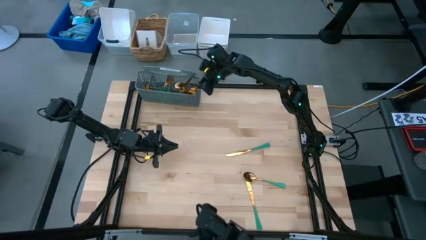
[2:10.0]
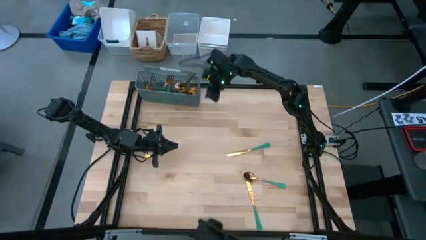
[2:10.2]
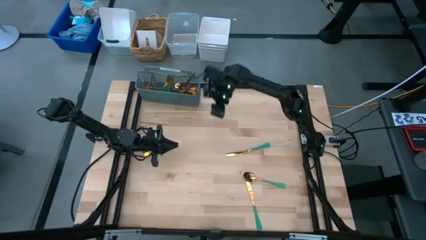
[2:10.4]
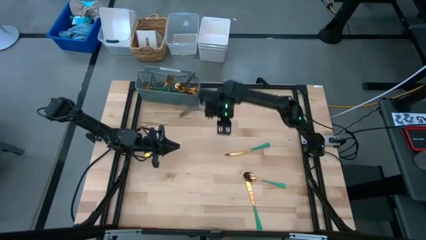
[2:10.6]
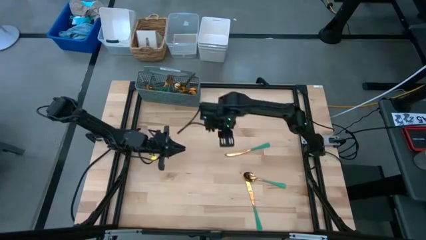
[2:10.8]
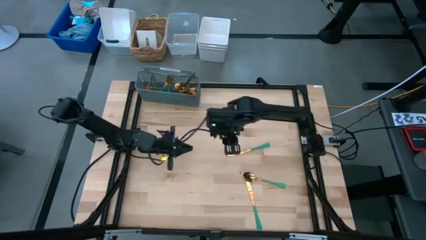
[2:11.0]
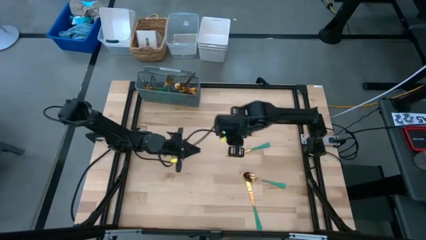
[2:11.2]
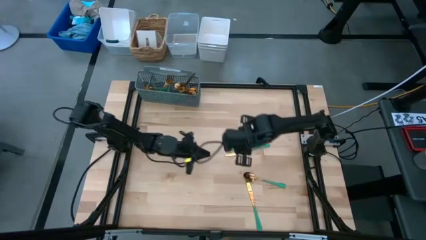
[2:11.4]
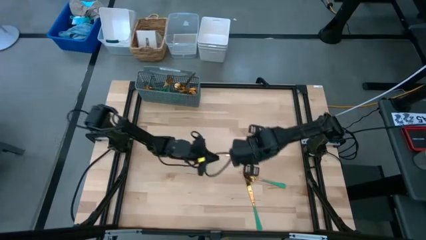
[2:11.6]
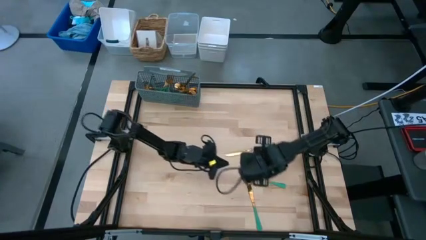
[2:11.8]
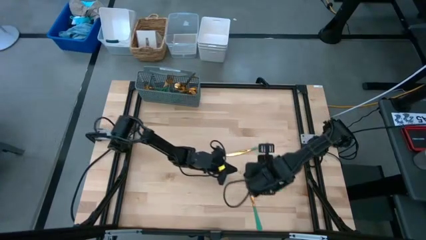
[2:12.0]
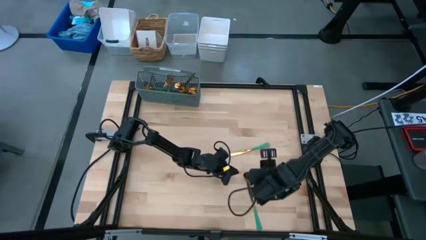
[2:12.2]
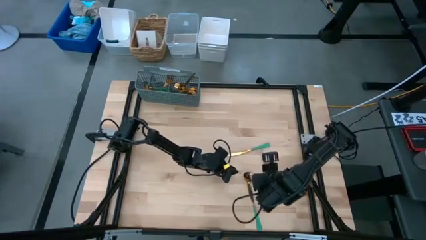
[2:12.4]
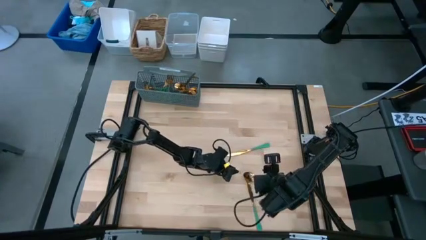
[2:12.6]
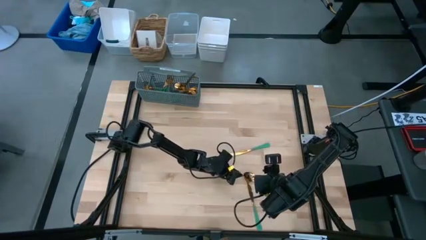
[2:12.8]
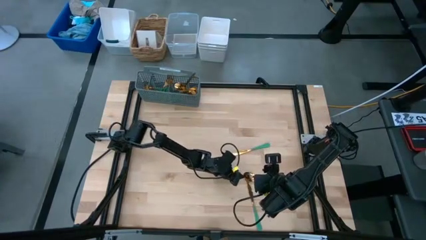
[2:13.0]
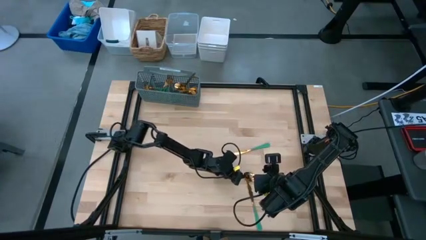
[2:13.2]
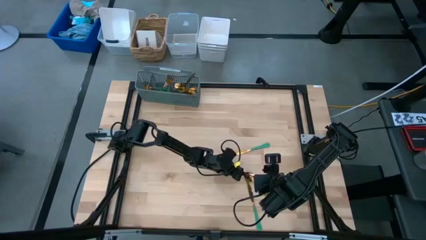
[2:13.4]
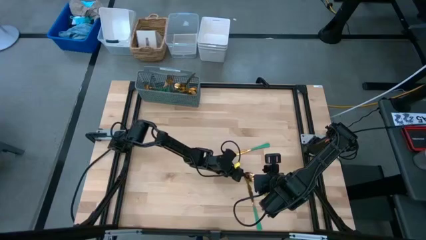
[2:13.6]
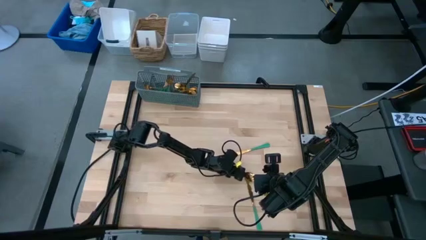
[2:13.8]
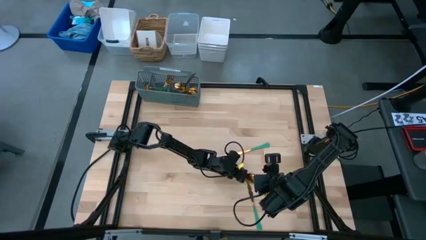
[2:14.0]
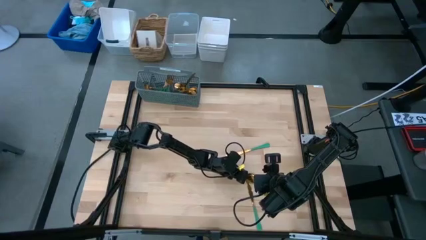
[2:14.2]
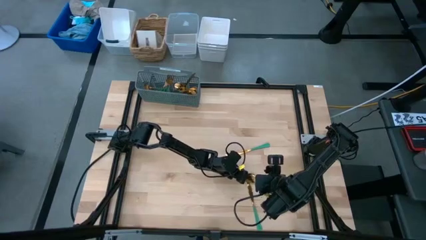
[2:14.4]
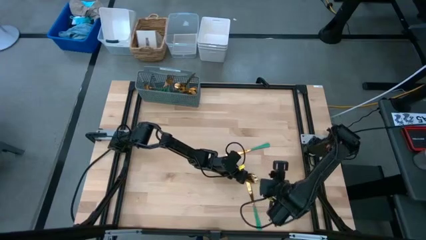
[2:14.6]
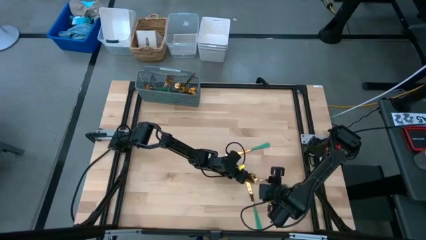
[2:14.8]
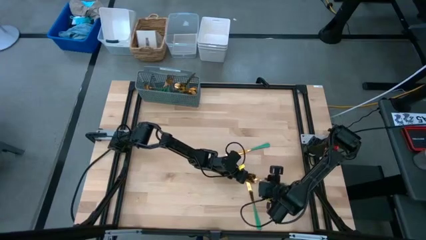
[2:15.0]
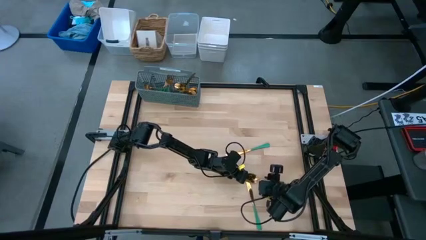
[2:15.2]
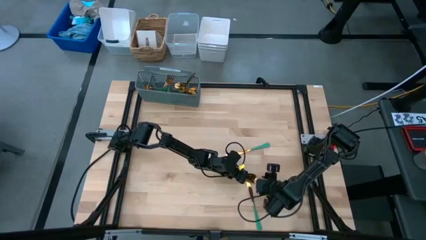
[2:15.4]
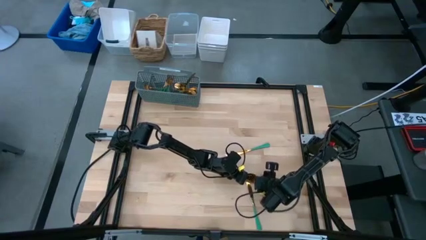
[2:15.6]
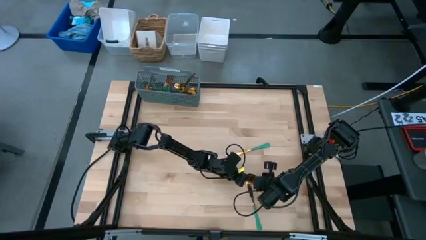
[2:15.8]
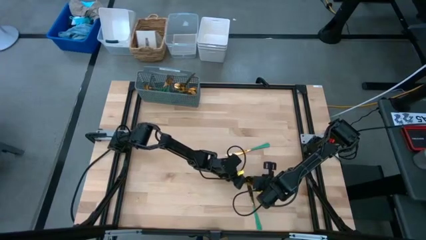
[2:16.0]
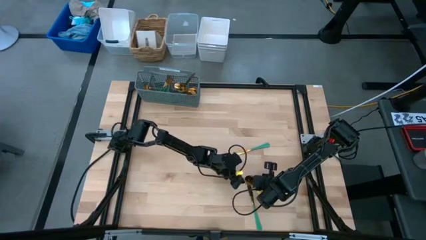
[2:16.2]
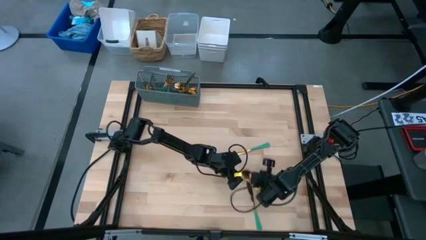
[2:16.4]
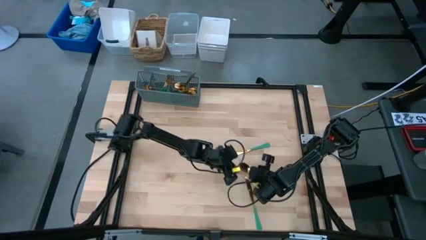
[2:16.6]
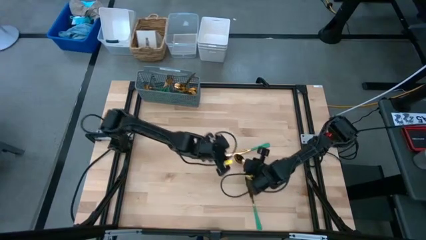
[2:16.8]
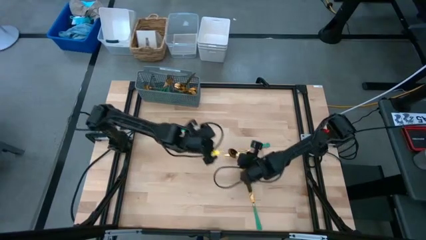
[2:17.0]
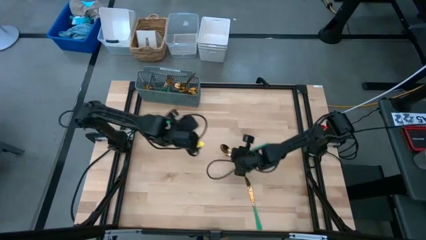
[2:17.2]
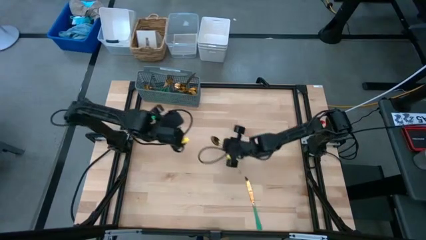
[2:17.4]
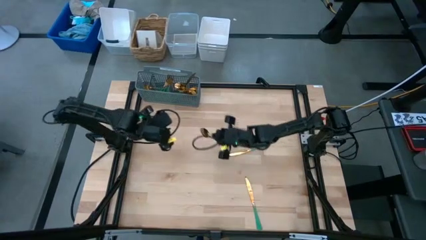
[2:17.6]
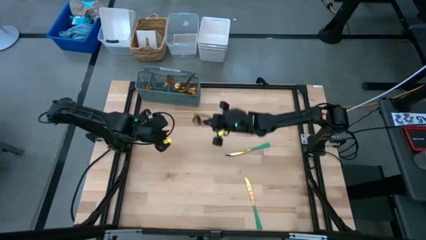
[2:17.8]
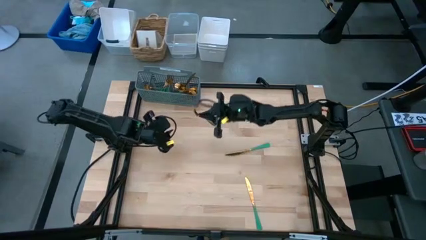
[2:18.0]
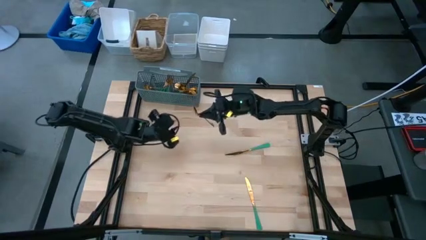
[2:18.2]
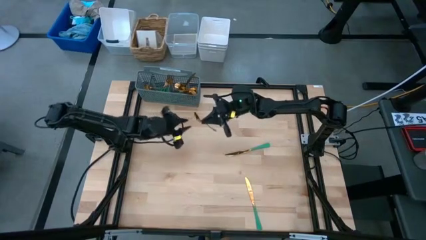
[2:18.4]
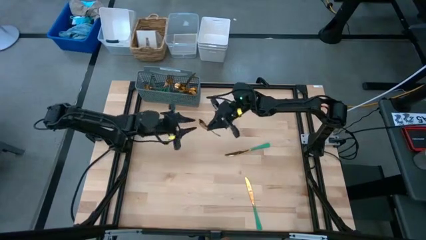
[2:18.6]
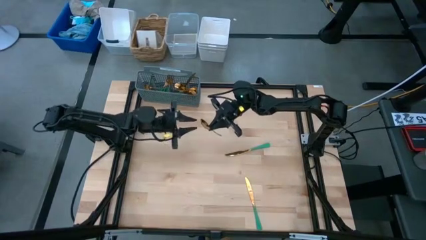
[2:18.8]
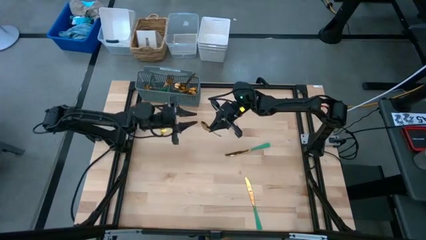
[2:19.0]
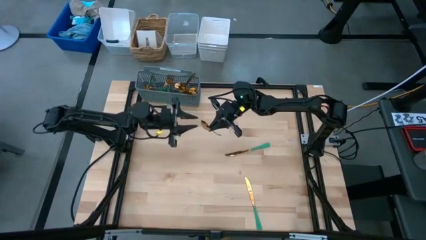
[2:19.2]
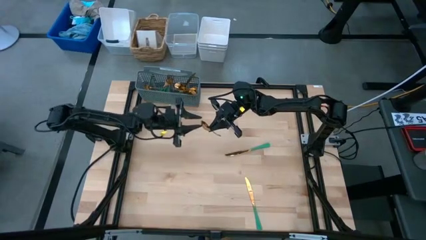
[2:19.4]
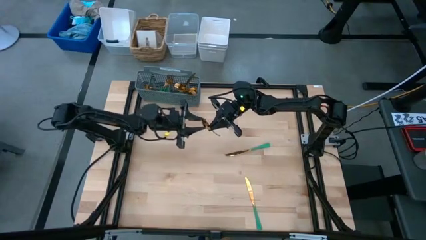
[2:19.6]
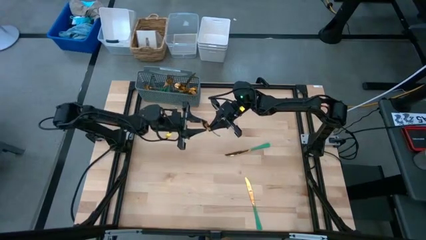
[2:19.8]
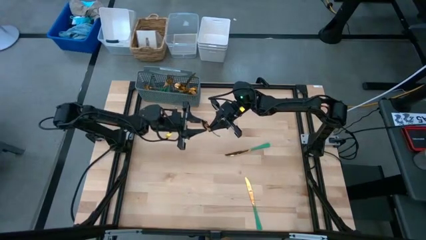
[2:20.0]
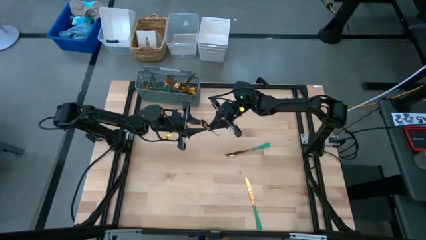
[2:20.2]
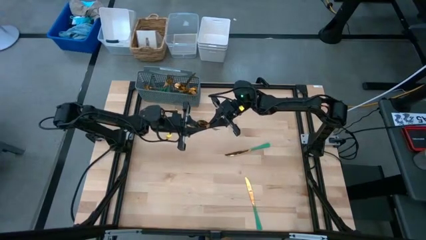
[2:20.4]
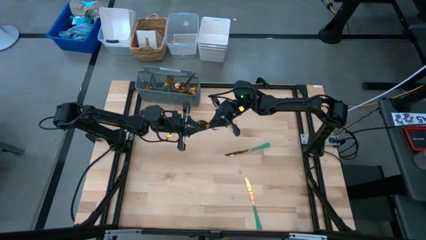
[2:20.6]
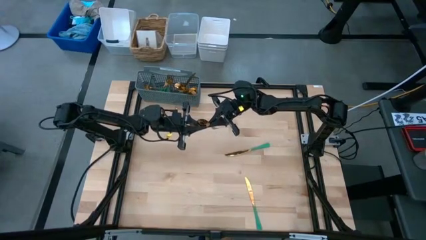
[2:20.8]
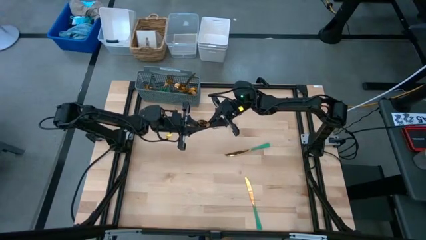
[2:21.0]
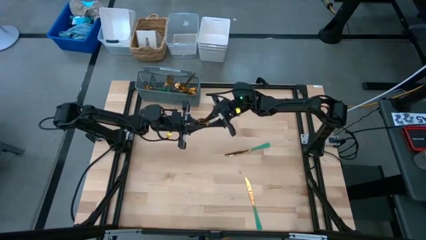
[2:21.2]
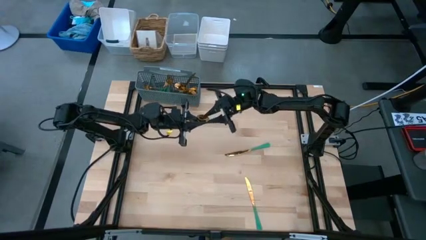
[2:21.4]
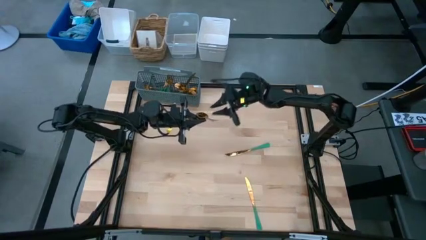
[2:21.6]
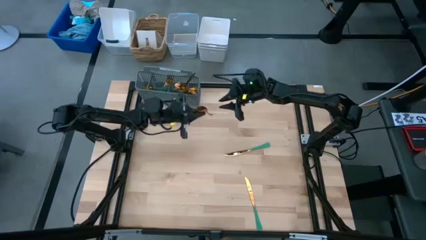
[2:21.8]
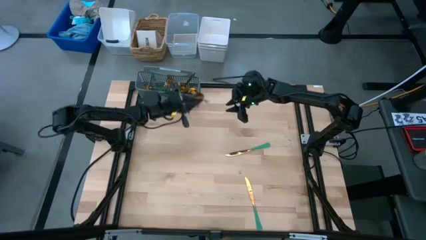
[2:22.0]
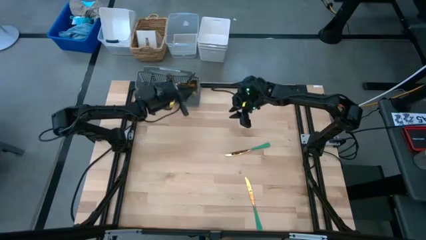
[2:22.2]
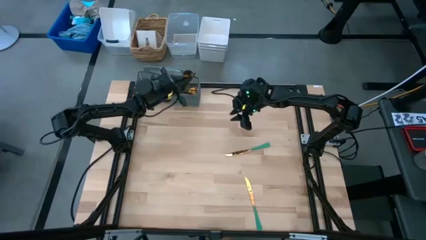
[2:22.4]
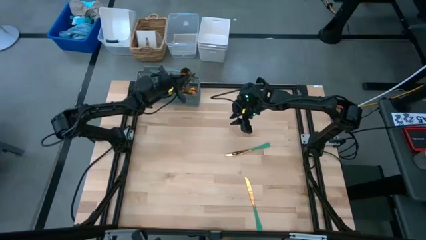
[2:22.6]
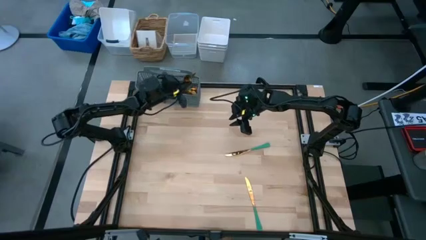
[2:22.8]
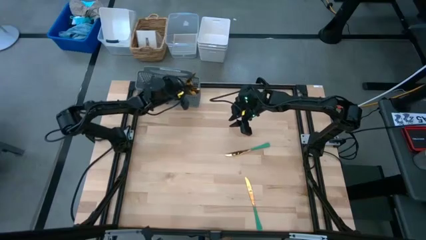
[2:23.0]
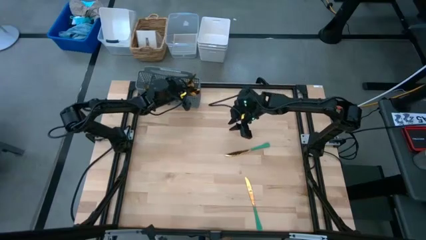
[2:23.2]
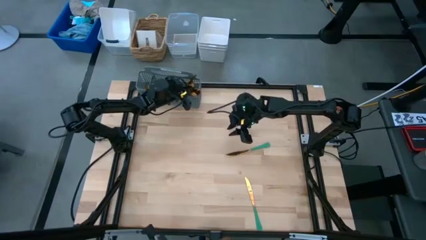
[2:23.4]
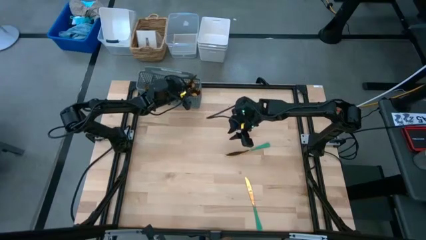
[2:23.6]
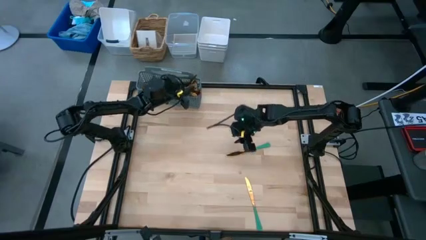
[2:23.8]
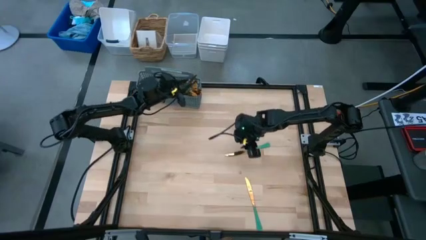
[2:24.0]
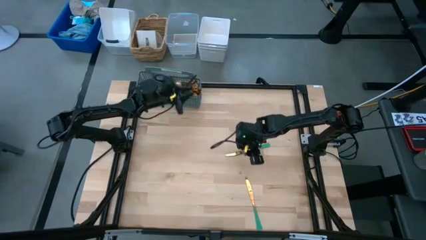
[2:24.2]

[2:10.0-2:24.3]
Task: Sort silverware
Put the green spoon into the gray silverware basket

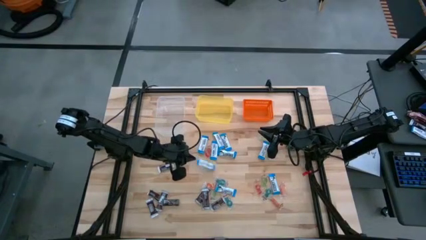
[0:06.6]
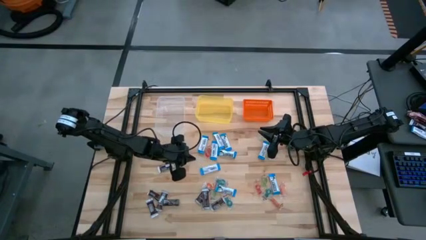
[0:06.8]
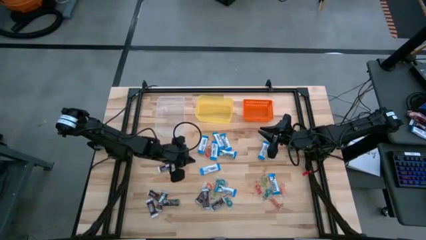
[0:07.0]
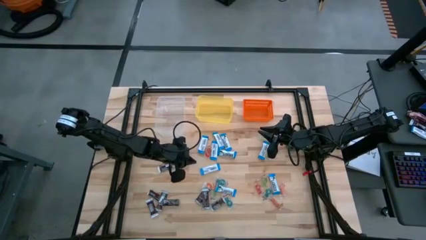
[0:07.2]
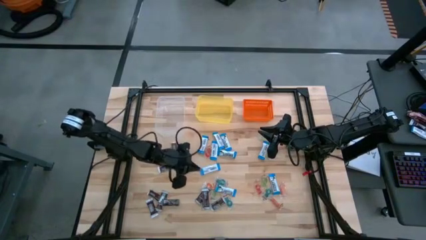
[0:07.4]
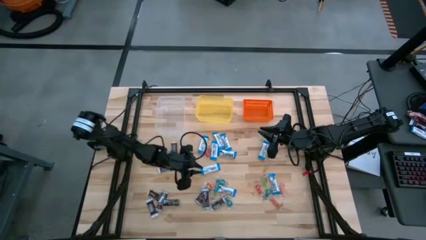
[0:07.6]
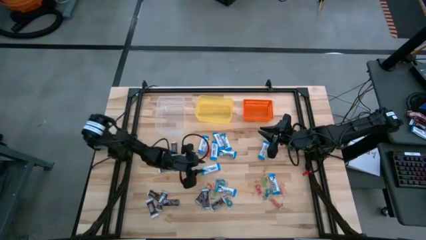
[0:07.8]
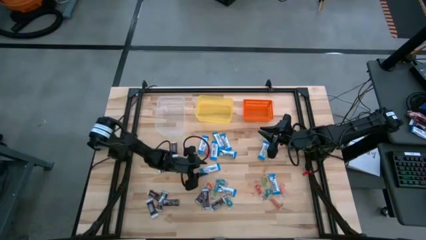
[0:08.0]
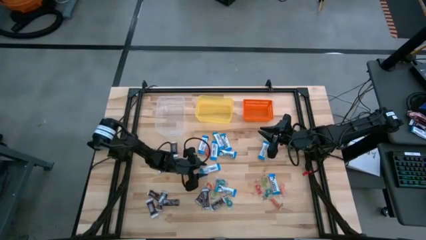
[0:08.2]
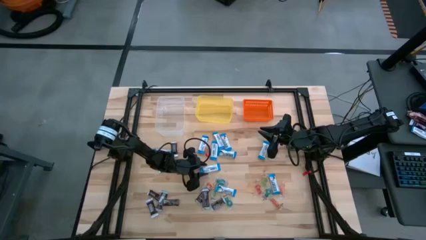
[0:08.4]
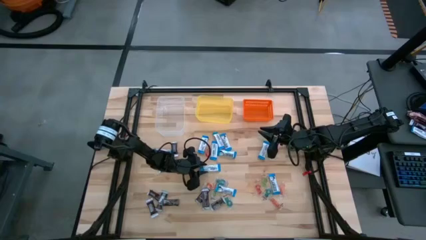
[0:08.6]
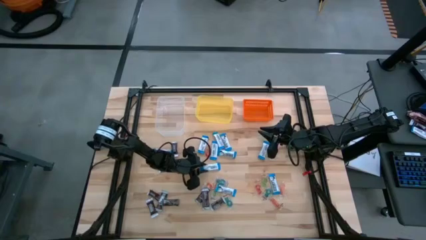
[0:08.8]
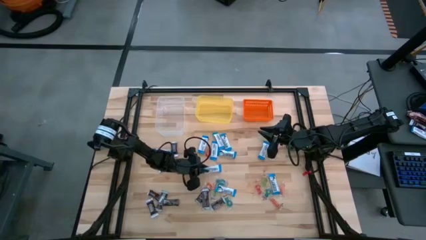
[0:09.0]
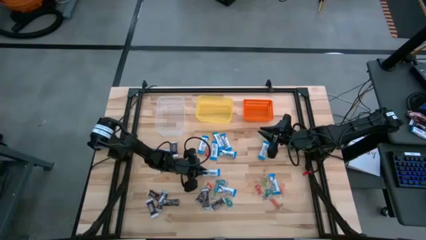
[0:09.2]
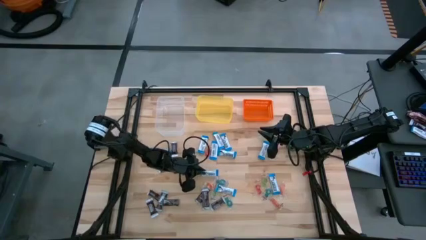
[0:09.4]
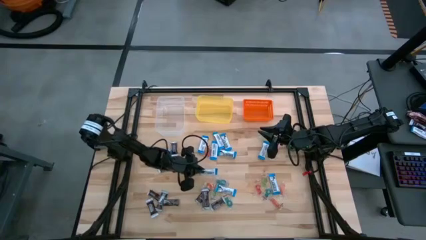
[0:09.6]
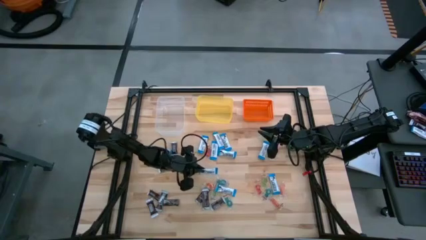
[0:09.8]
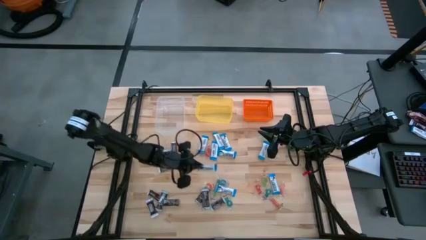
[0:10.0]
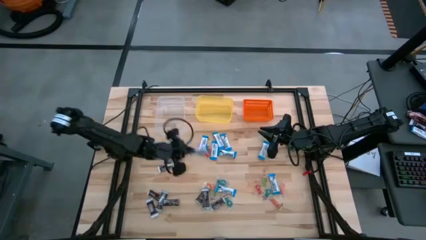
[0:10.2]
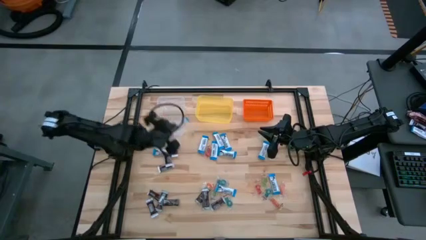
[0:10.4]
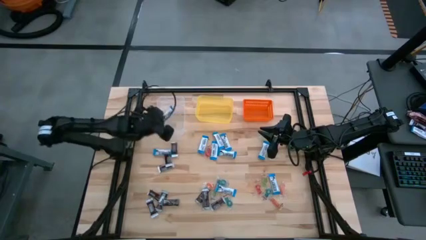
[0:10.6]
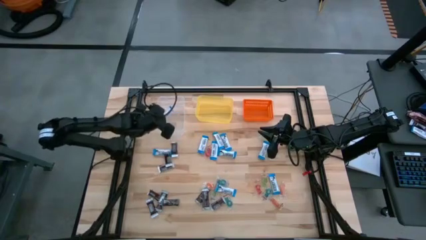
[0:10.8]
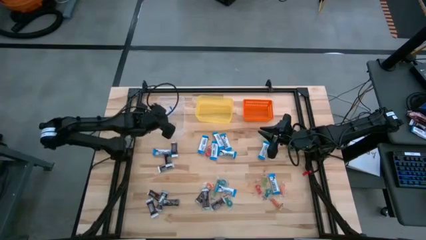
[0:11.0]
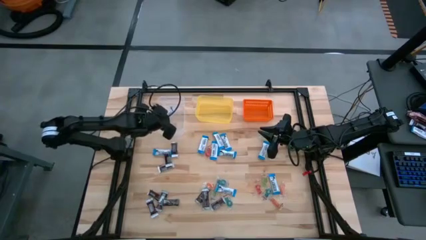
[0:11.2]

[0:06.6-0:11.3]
Task: Sort candy
Put the white chocolate into the transparent bin
